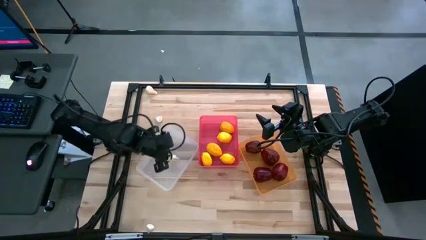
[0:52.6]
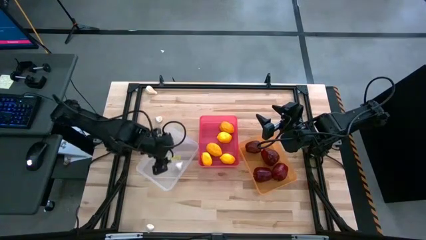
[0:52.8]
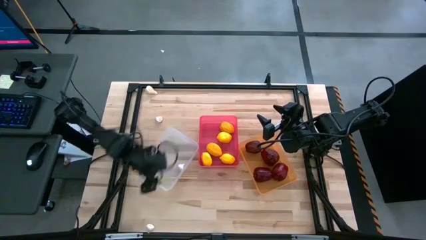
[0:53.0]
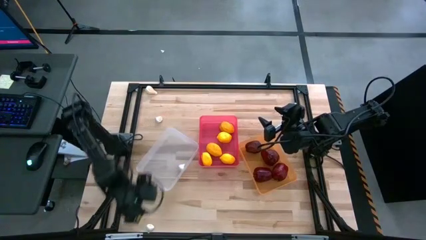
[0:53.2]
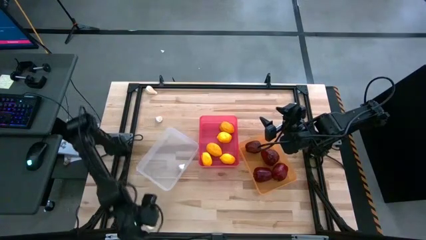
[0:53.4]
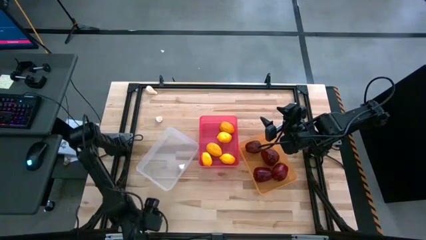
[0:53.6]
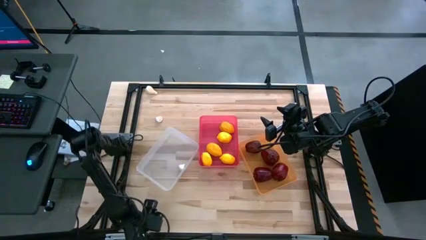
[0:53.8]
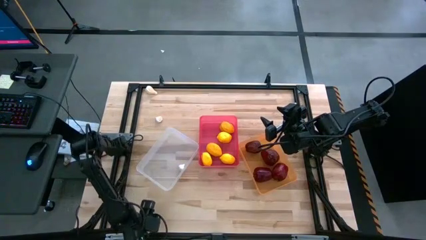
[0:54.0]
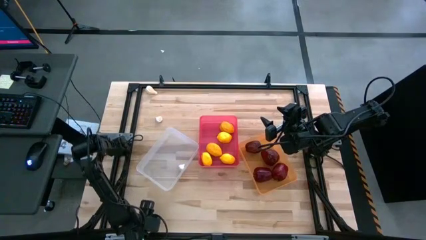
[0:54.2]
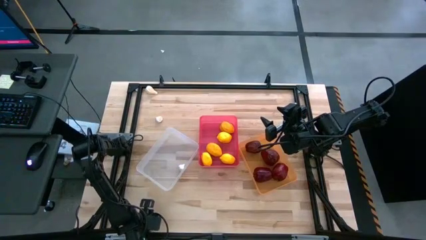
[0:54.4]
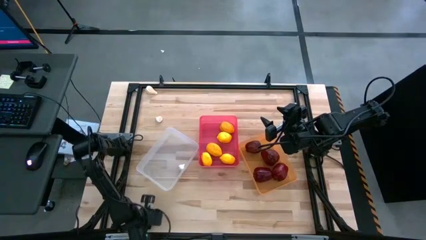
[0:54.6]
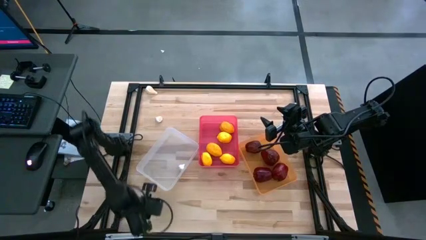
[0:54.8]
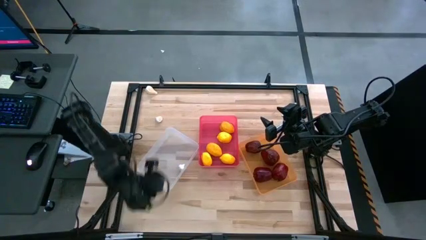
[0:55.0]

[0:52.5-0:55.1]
Task: Sort produce into baskets
Put the white garlic into the transparent bin

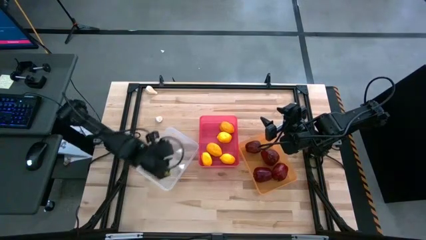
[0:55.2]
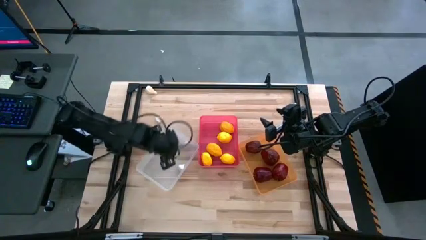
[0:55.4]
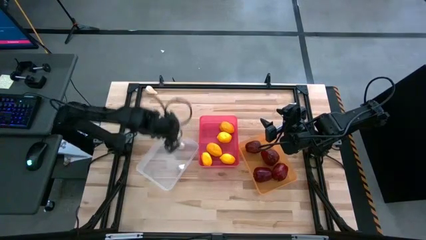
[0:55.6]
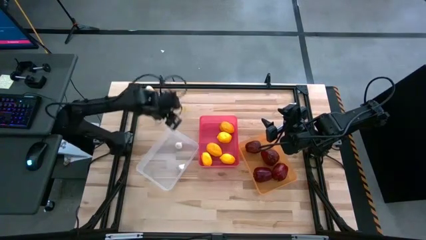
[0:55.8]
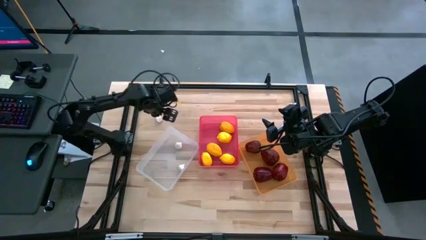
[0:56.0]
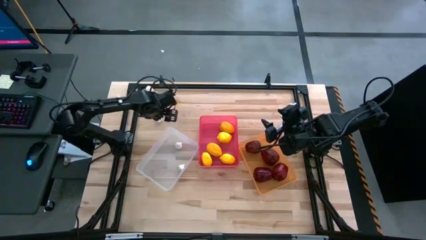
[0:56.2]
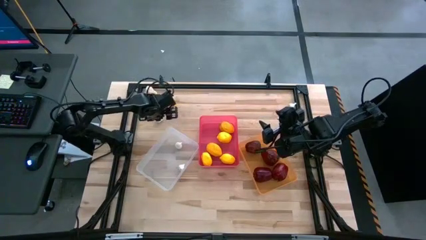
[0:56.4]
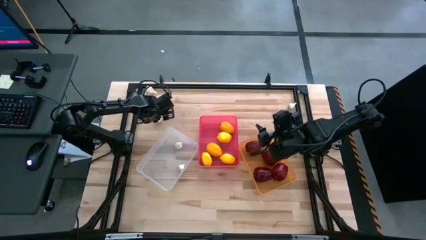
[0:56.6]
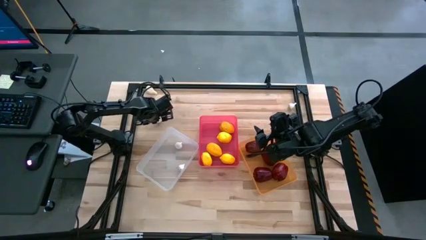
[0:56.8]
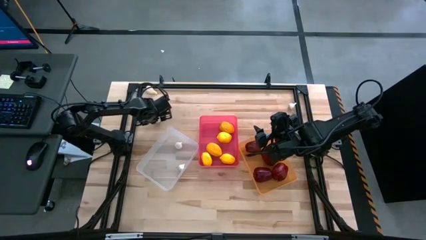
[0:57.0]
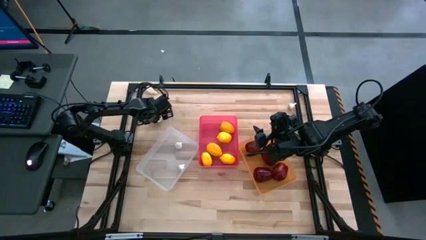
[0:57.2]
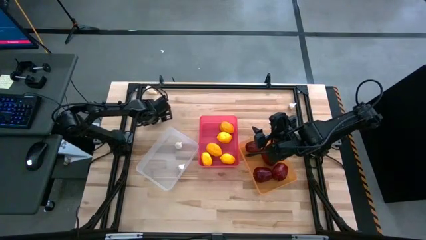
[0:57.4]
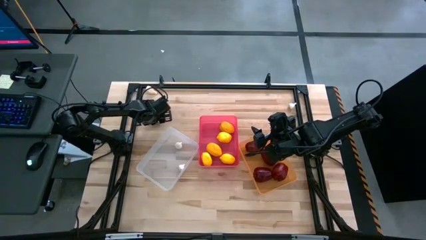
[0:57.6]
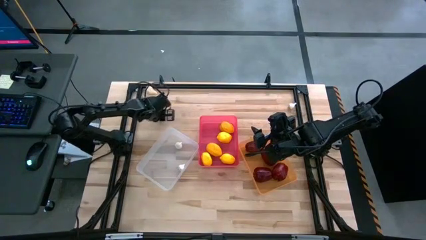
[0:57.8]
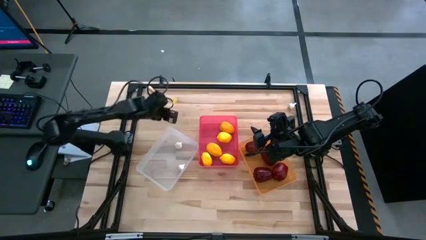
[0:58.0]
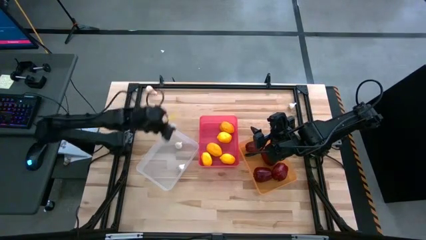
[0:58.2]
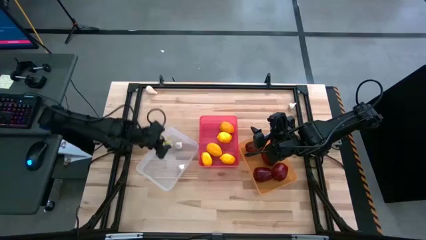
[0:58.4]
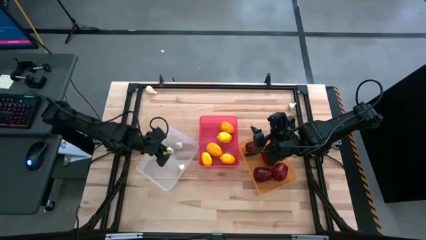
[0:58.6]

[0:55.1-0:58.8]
Put the white garlic into the transparent bin

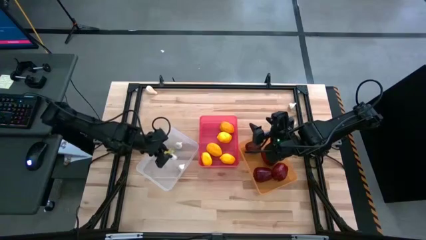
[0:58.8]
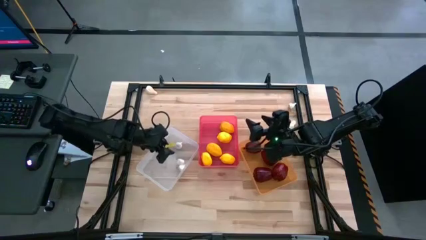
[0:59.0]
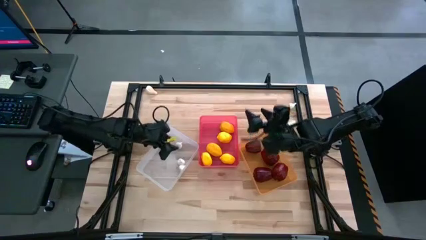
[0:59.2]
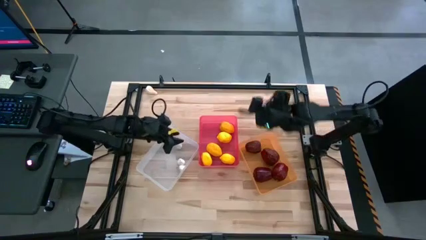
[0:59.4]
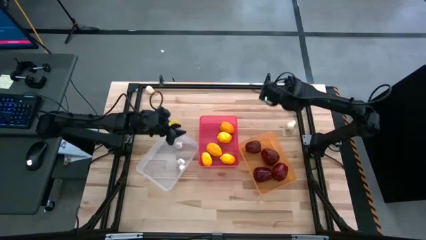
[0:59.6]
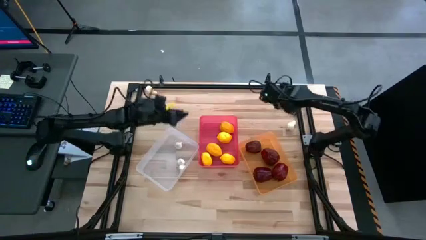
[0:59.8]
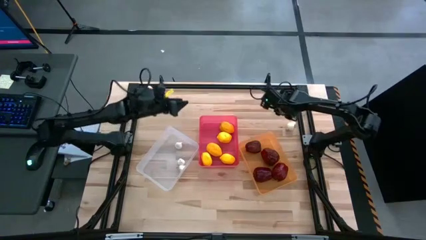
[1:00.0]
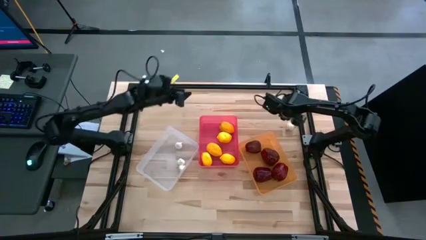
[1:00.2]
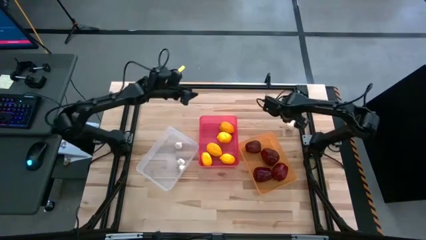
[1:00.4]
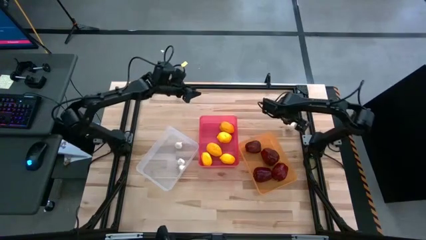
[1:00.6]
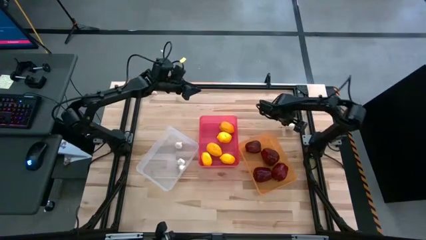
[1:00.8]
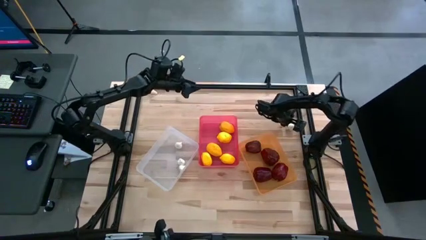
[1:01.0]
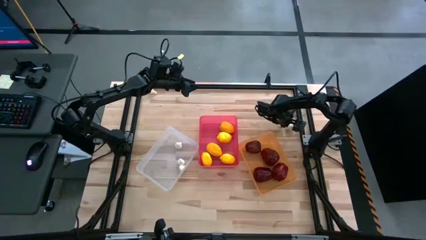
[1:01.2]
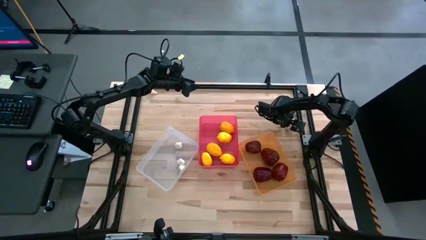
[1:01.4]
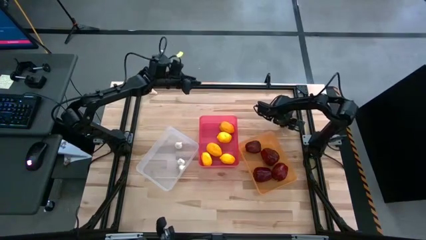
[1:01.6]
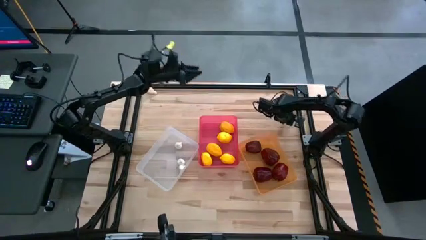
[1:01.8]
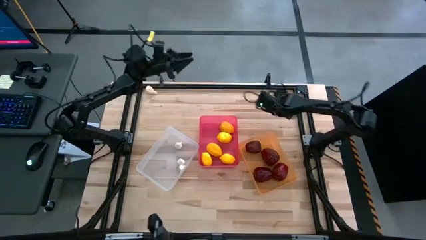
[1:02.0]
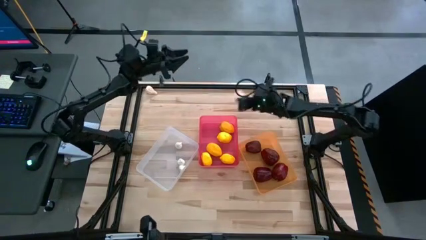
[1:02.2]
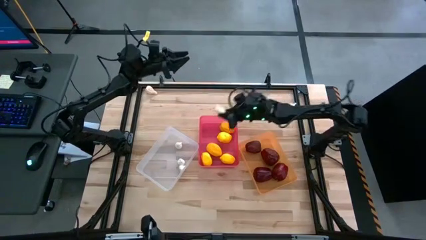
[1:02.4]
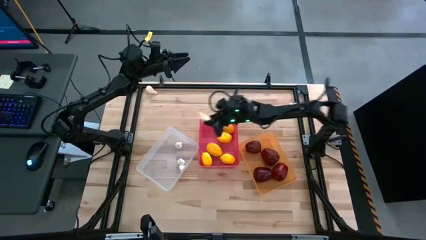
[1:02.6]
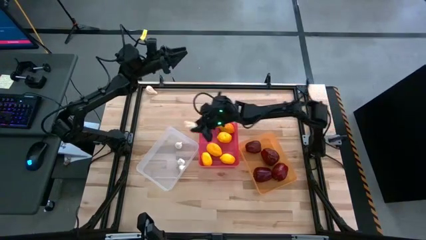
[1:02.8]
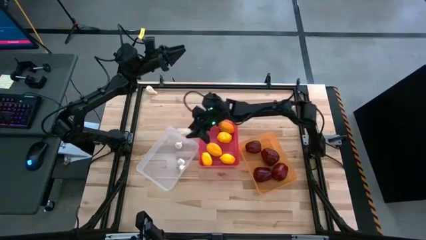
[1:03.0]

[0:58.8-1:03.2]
Put the white garlic into the transparent bin

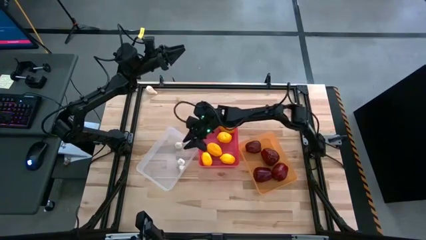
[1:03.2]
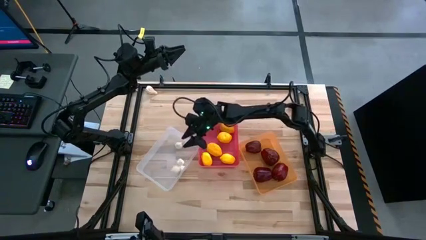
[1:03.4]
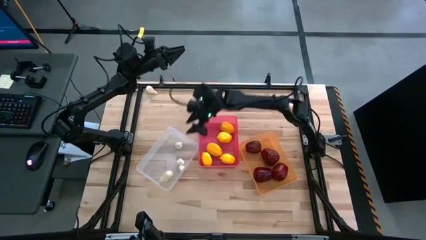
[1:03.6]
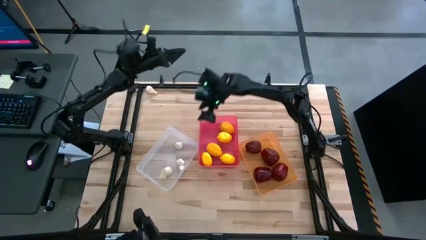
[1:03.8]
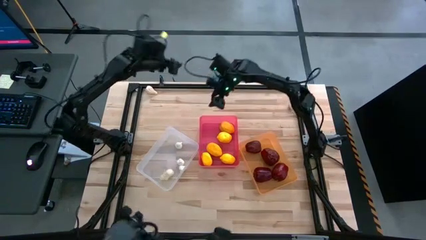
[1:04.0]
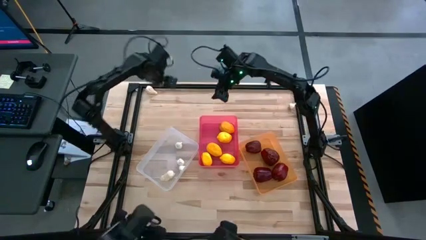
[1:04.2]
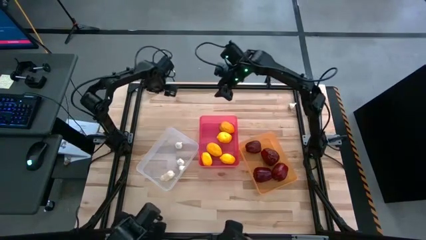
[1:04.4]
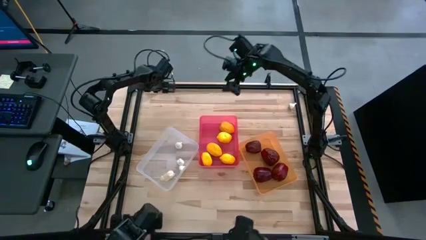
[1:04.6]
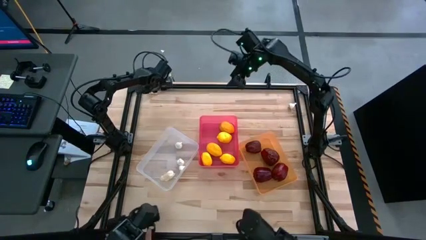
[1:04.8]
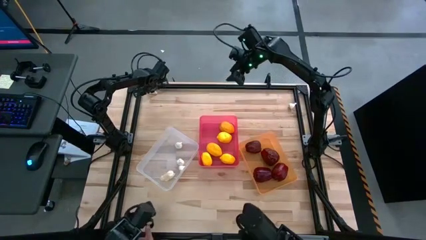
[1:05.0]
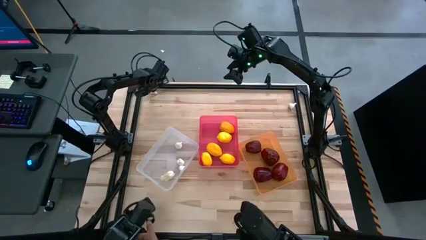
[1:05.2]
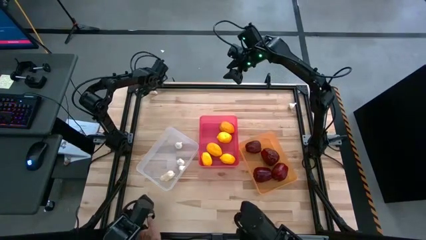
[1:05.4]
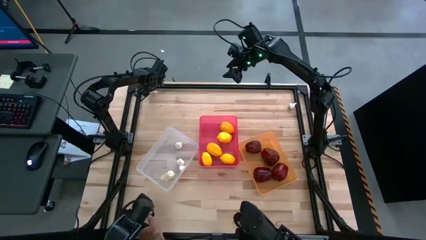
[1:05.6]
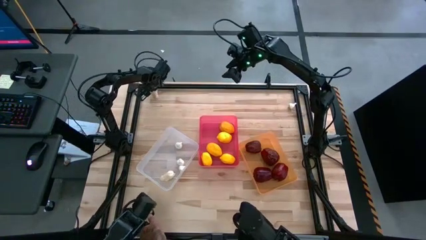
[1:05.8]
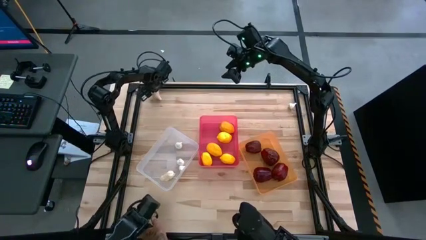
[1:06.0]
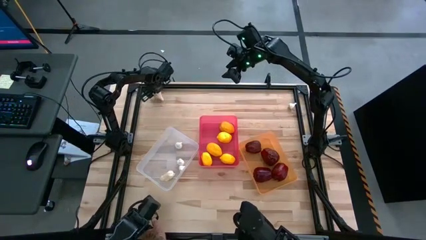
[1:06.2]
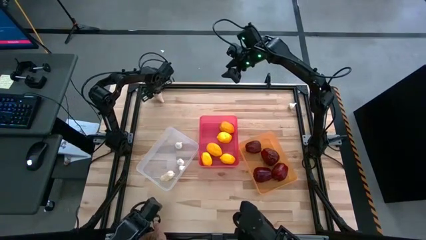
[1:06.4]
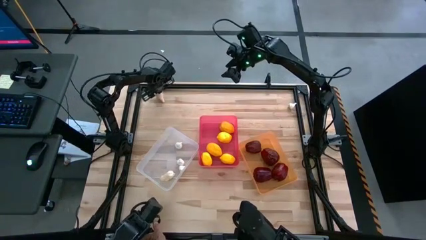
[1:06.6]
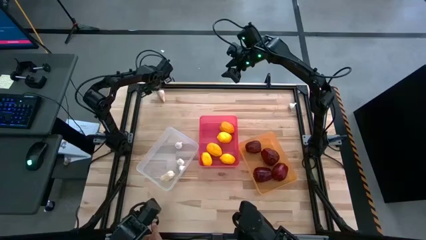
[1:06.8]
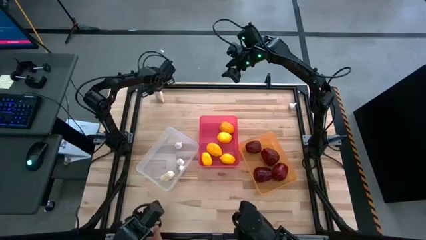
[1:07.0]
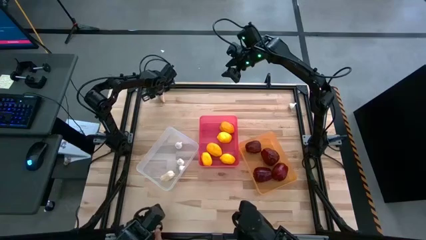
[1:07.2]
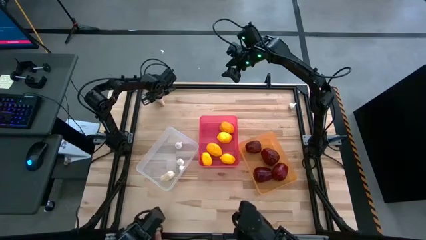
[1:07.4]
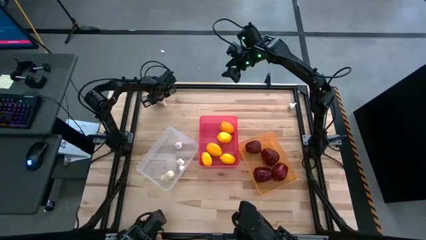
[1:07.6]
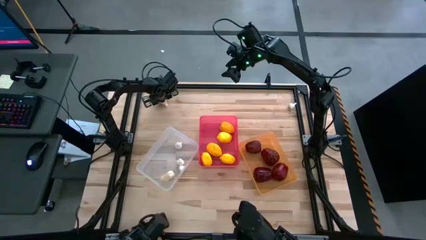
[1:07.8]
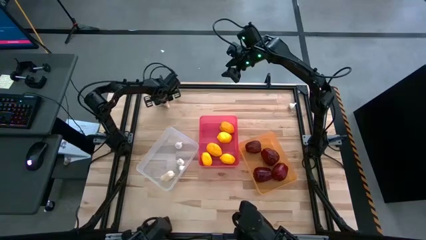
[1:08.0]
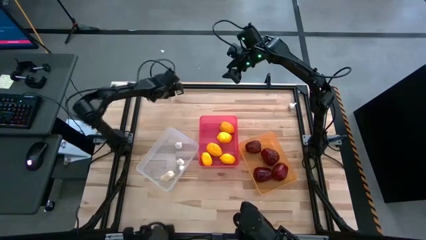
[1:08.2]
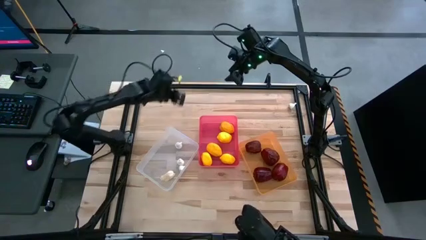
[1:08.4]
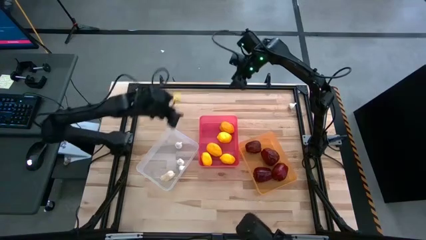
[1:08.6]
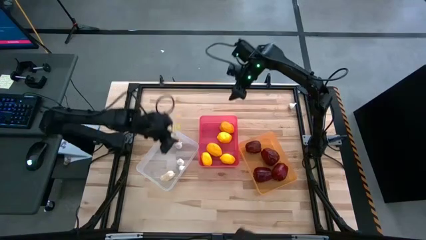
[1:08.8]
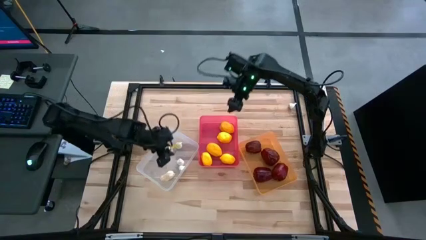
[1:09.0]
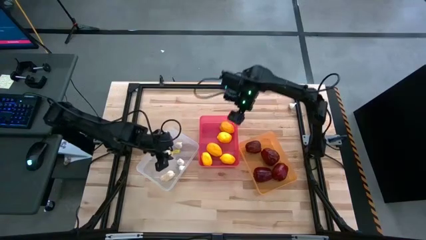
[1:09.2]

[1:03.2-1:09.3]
Put the white garlic into the transparent bin

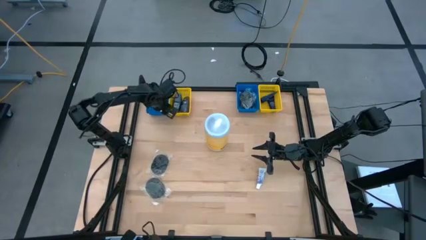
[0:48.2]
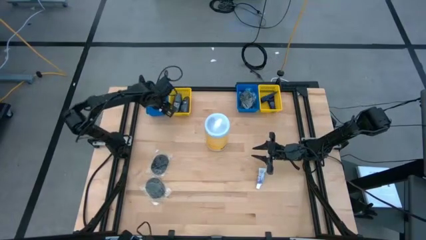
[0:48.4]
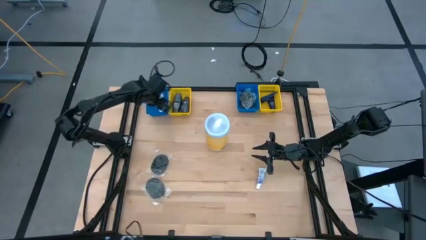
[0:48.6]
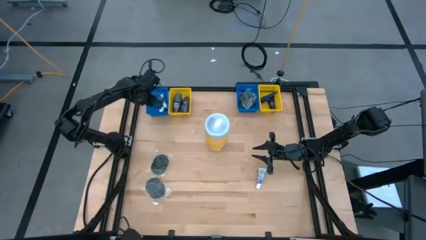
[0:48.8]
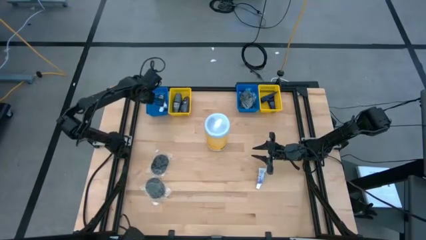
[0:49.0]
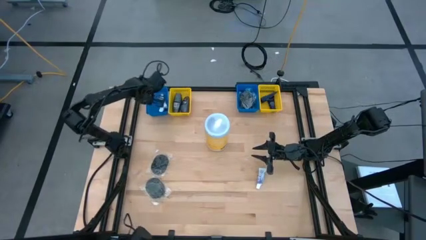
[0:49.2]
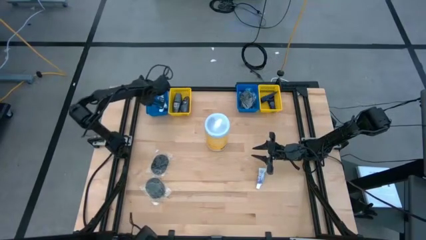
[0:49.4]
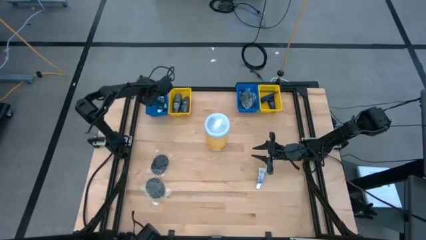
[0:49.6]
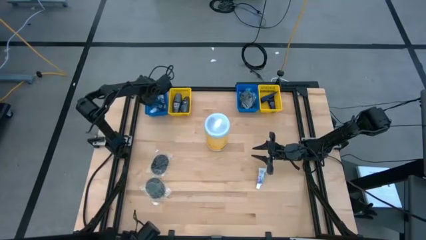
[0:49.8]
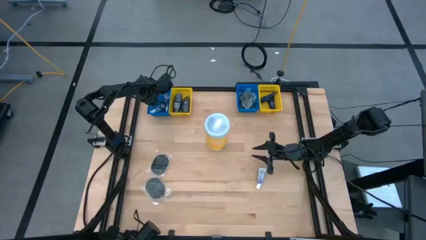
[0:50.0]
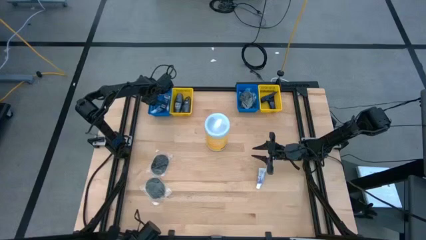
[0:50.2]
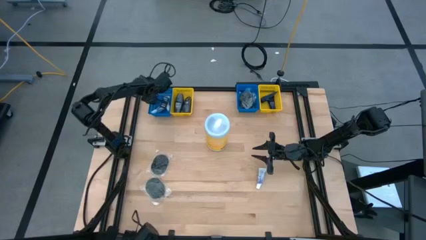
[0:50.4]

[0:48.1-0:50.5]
Task: Pick & Place Travel size toiletries
Adjust the left blue bin
